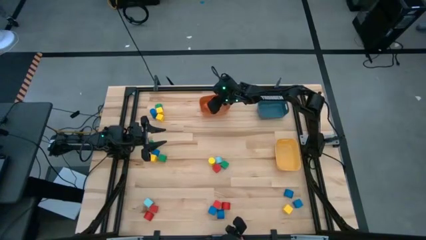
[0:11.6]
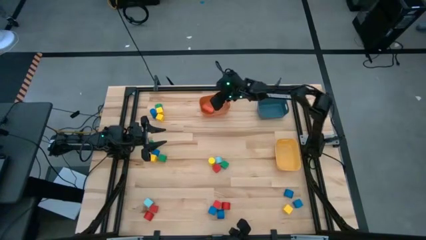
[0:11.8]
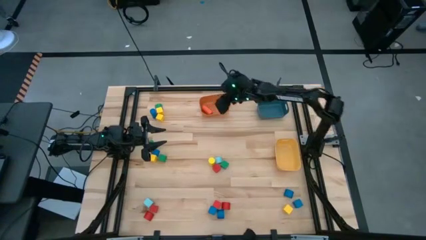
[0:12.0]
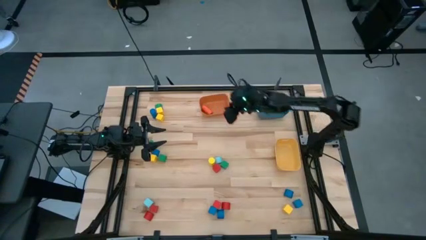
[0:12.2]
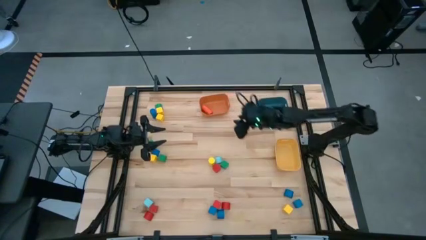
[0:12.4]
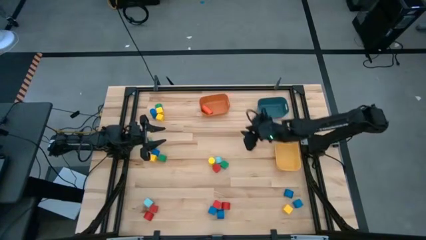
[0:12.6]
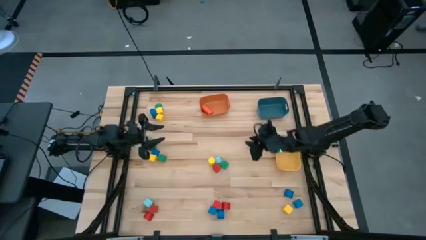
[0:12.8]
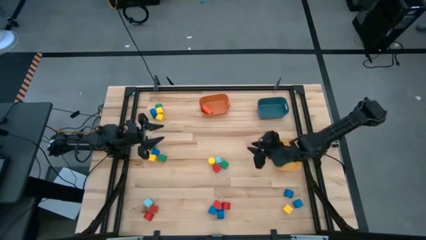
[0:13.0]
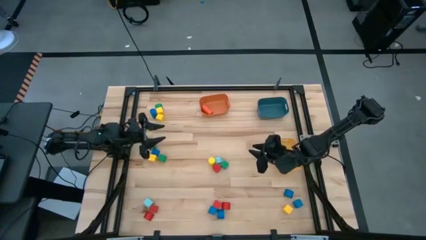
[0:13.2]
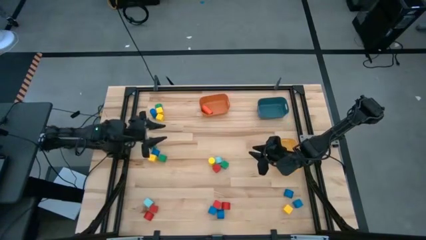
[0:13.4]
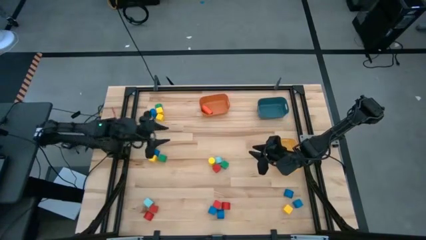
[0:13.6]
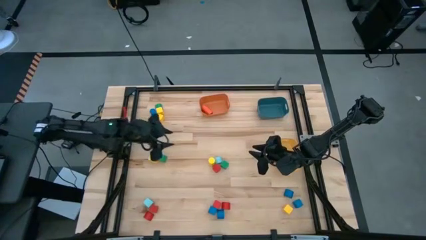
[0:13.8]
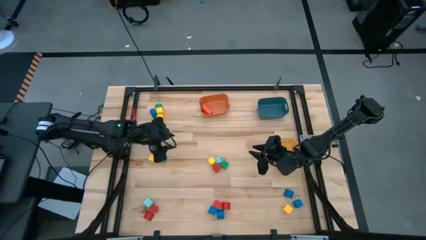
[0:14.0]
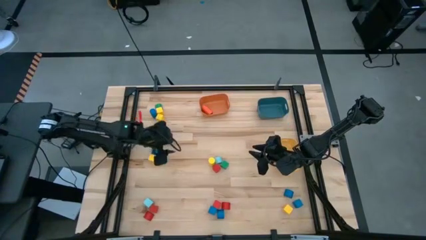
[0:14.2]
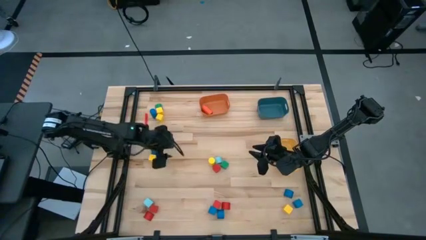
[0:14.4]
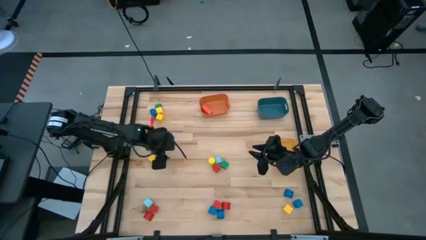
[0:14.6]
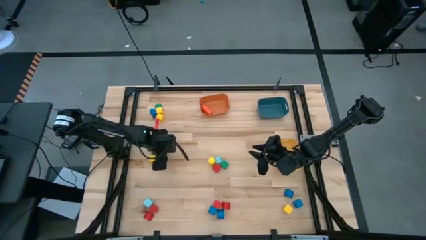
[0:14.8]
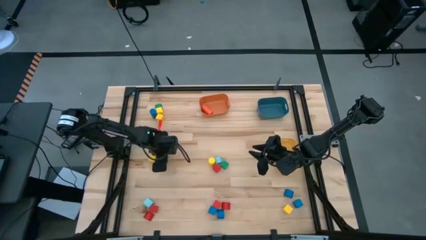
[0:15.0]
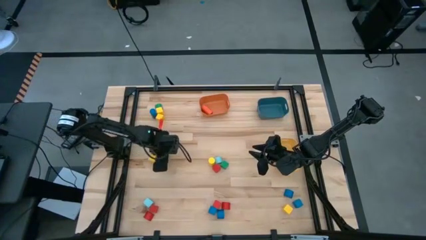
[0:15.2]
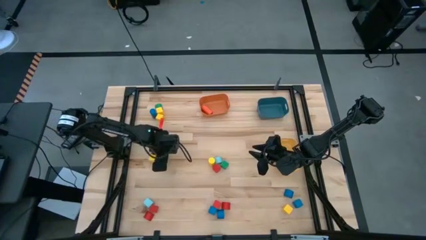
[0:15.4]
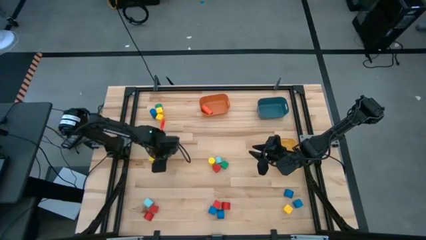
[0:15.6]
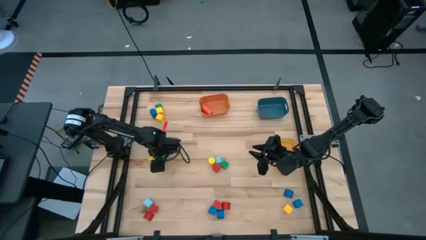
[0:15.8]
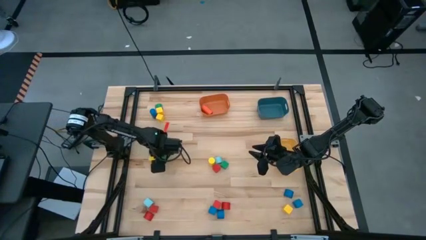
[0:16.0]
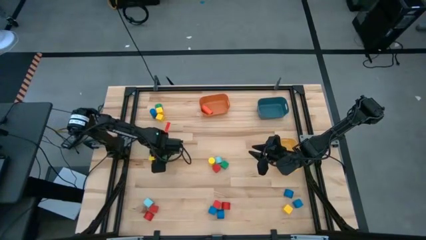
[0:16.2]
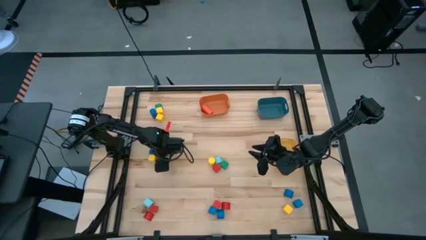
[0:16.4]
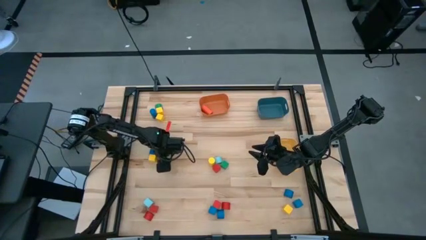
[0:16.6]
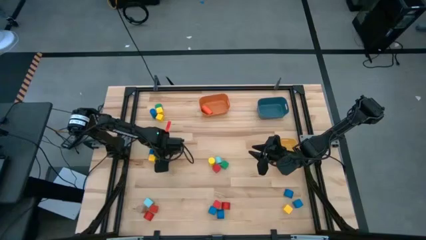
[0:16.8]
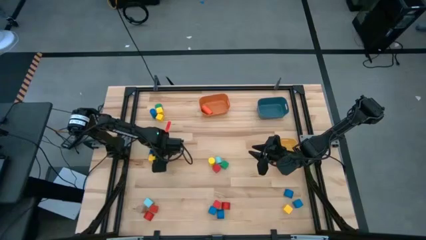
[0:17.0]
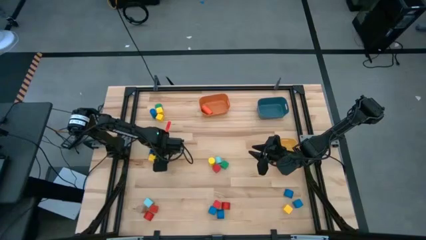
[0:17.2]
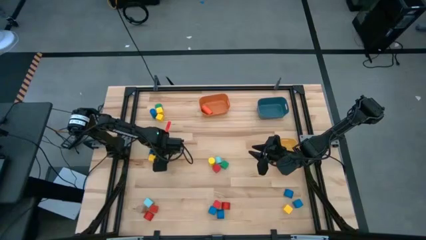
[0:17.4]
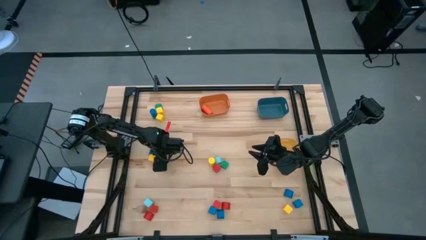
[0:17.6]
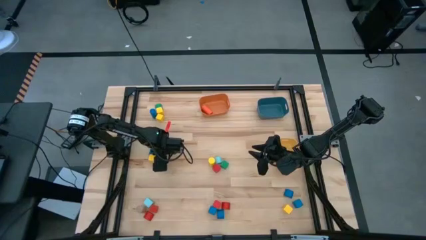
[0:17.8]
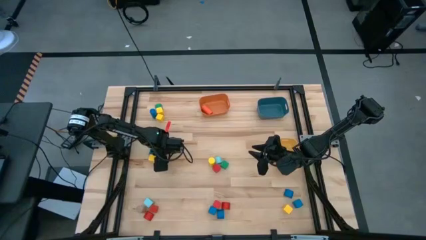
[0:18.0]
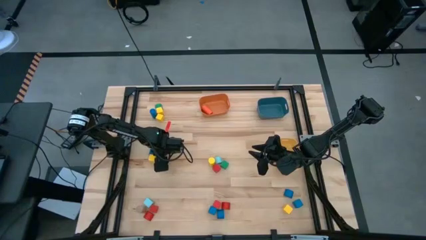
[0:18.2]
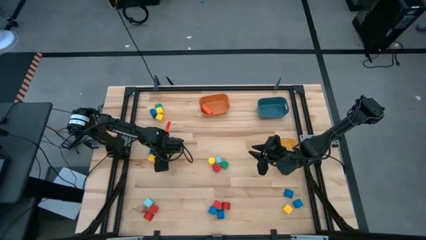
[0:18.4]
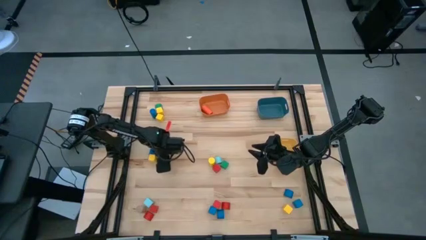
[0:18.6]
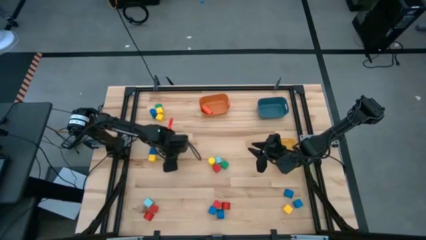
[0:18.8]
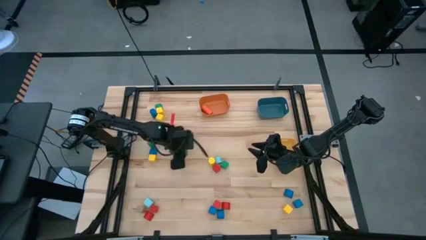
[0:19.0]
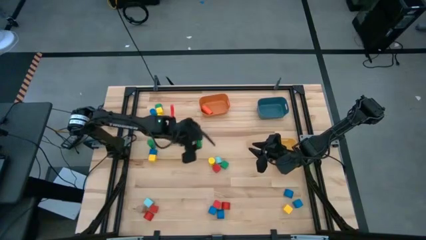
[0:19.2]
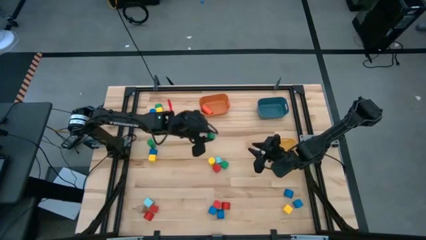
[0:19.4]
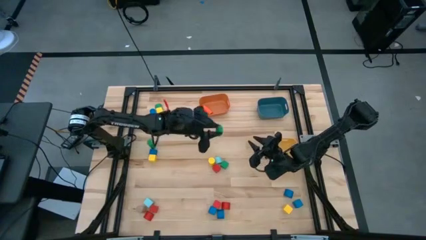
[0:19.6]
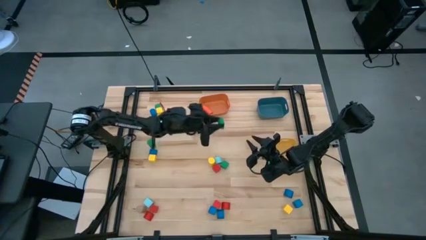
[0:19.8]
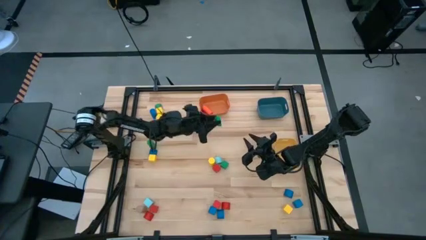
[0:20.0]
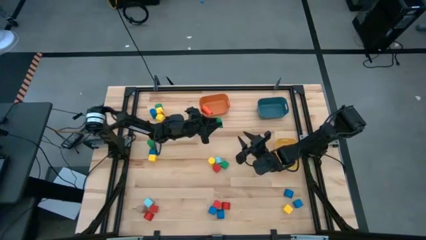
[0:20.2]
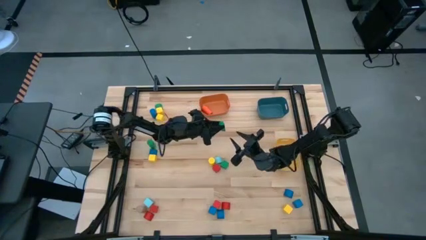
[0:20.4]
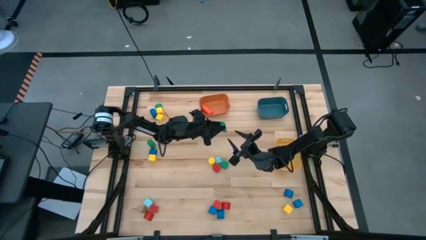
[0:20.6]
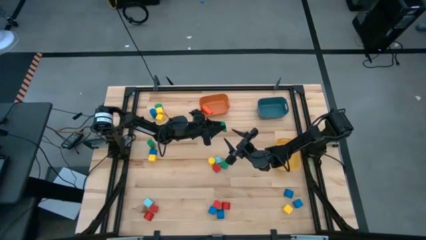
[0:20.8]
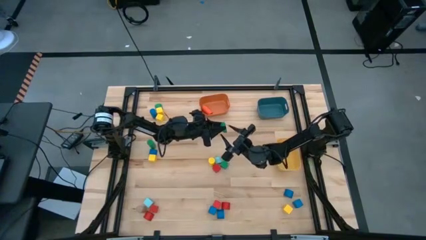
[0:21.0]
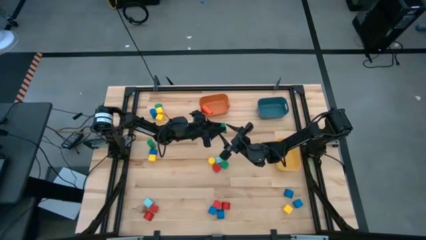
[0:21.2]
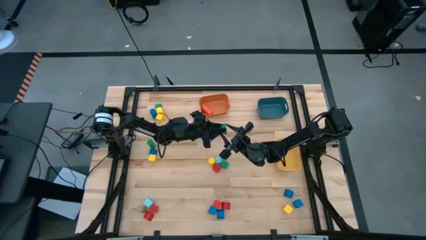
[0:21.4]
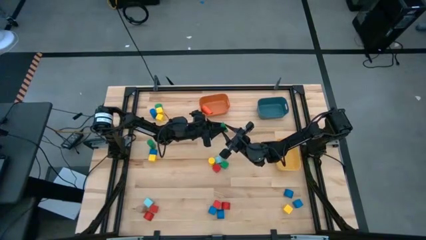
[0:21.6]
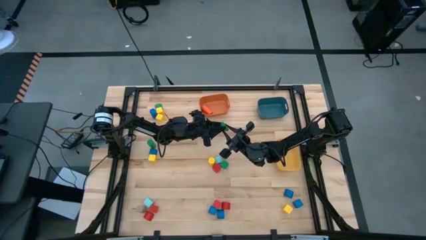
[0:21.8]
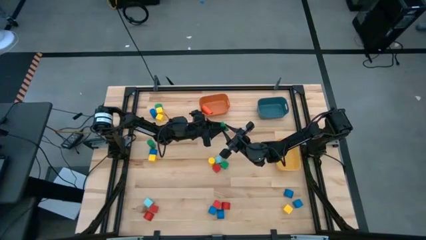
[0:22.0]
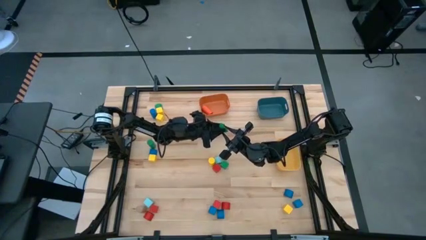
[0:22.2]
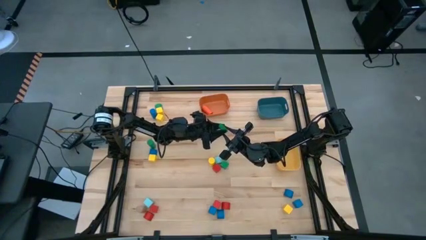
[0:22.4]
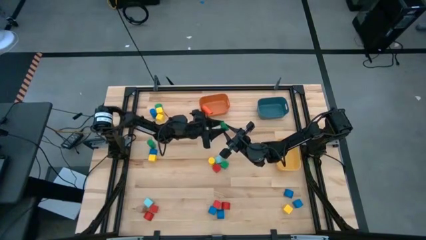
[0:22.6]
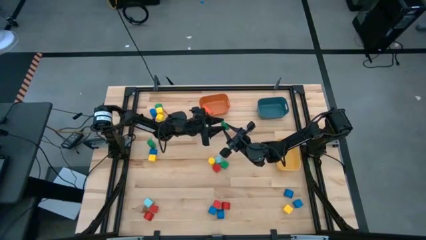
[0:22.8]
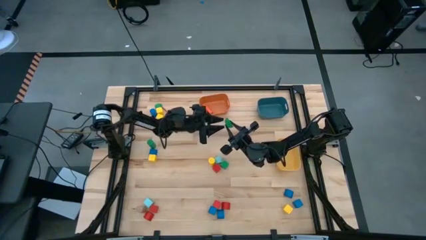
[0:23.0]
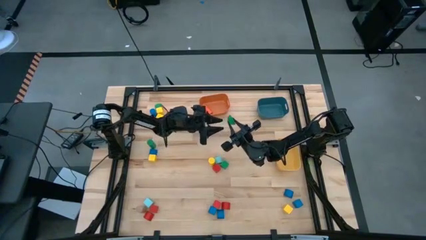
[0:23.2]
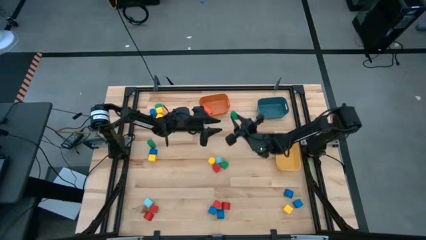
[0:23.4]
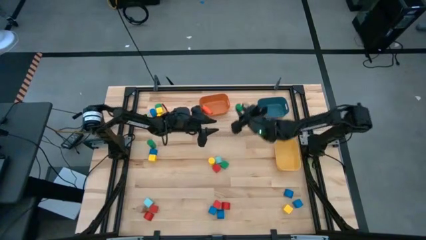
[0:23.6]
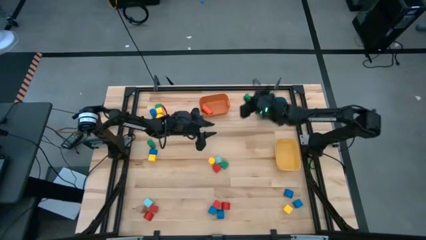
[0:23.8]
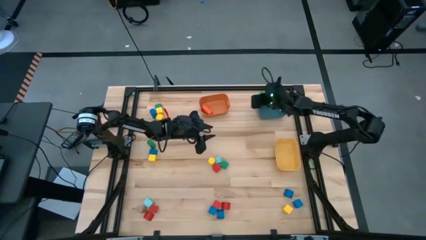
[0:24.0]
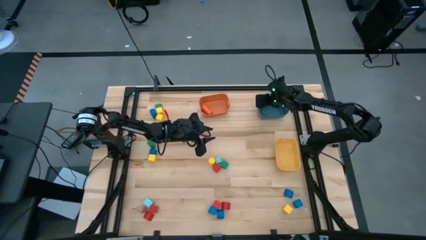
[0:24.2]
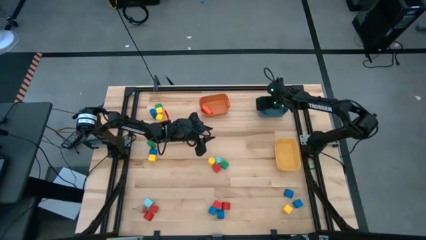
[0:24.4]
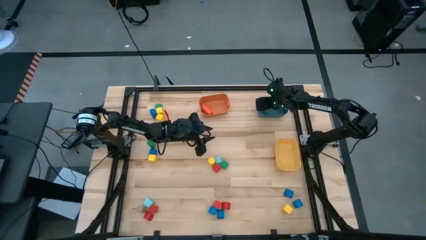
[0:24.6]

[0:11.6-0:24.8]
Task: Sort blocks by size
Put the green half circle block into the blue bin
